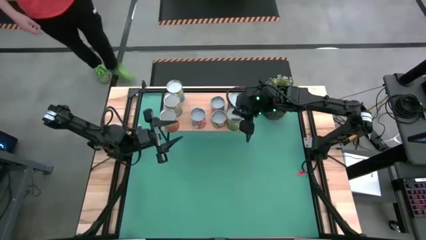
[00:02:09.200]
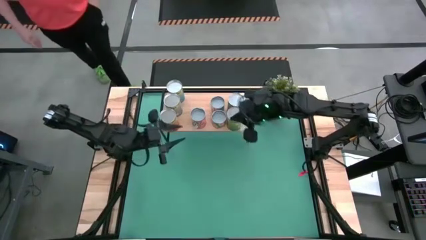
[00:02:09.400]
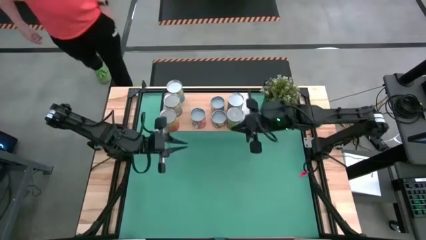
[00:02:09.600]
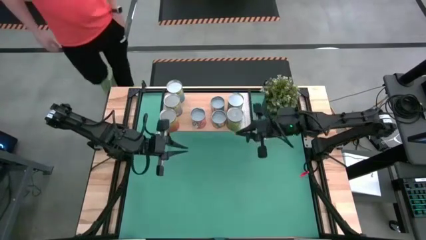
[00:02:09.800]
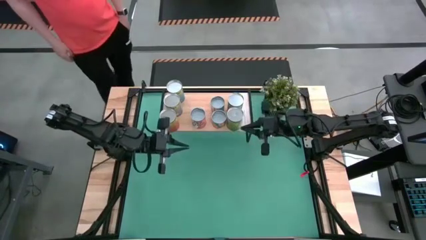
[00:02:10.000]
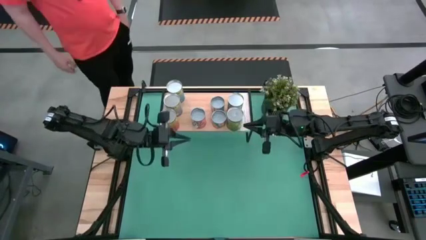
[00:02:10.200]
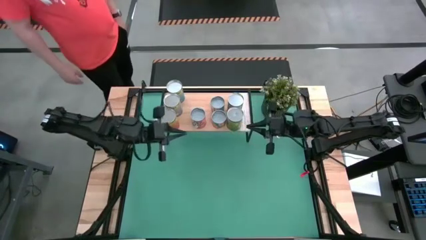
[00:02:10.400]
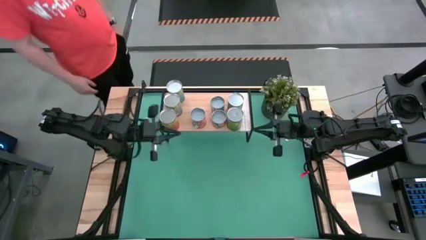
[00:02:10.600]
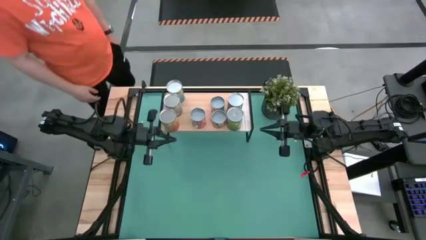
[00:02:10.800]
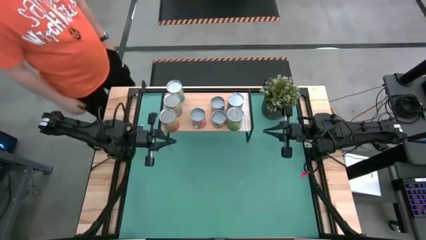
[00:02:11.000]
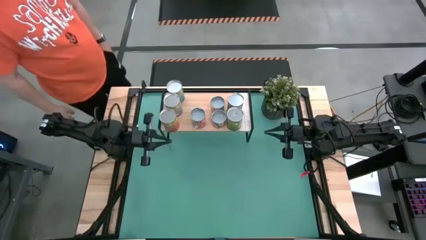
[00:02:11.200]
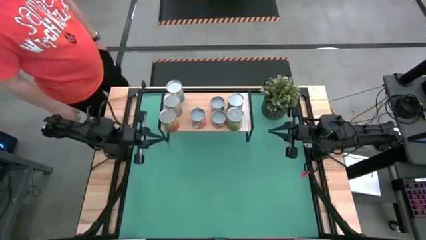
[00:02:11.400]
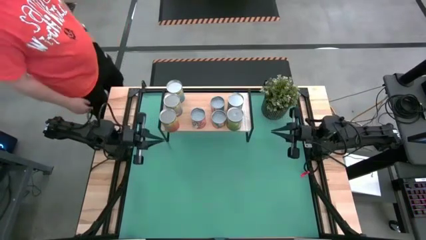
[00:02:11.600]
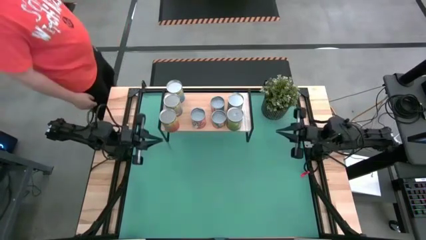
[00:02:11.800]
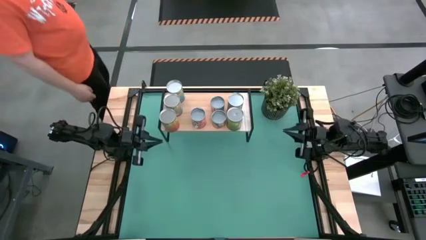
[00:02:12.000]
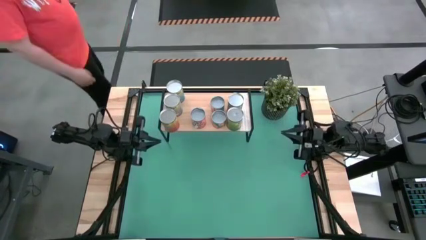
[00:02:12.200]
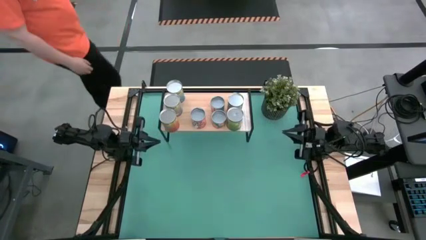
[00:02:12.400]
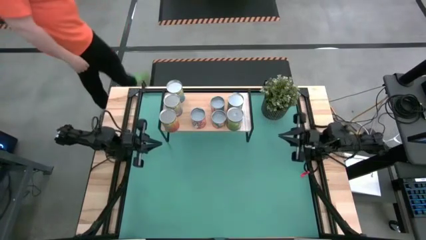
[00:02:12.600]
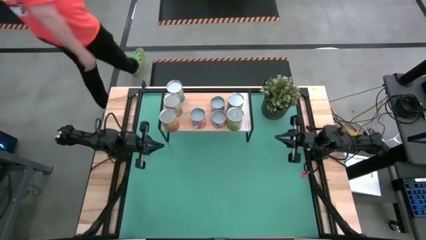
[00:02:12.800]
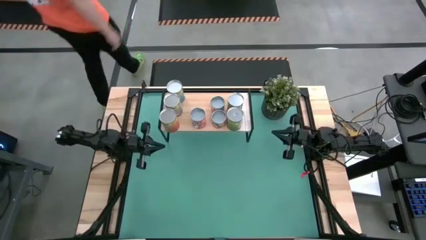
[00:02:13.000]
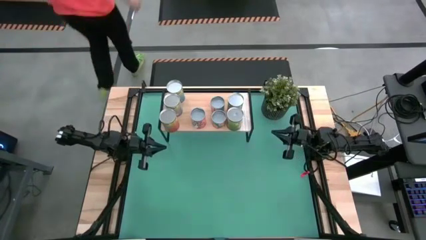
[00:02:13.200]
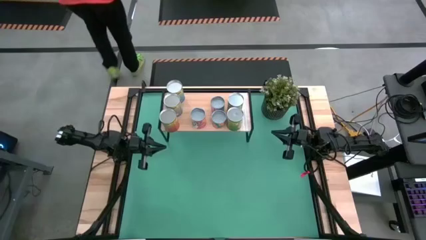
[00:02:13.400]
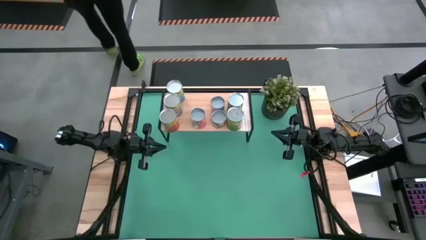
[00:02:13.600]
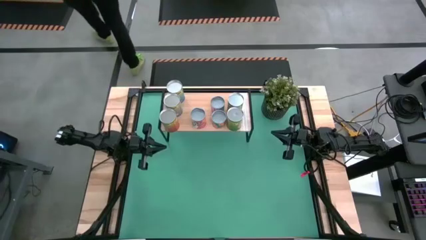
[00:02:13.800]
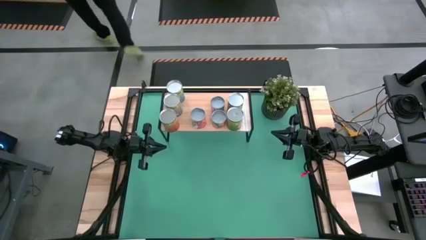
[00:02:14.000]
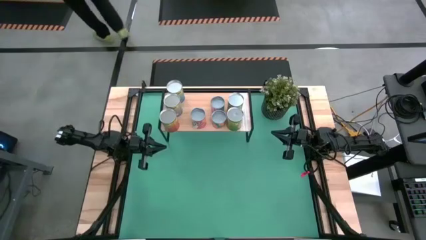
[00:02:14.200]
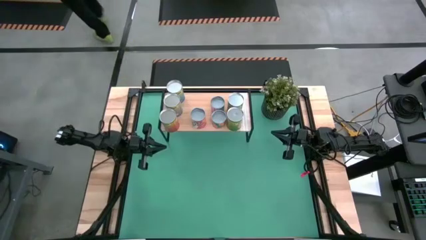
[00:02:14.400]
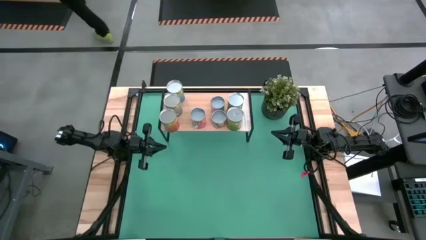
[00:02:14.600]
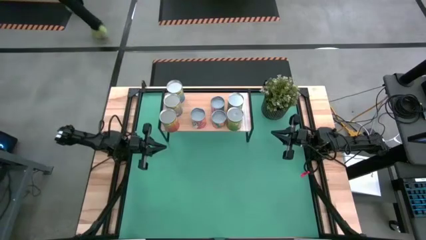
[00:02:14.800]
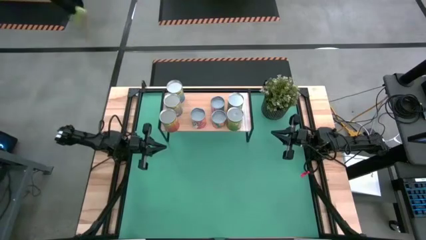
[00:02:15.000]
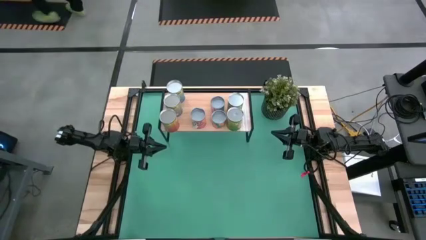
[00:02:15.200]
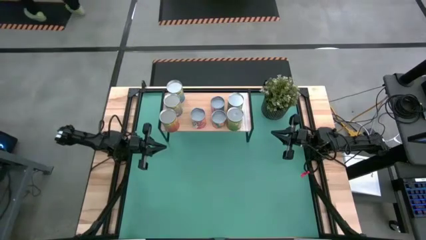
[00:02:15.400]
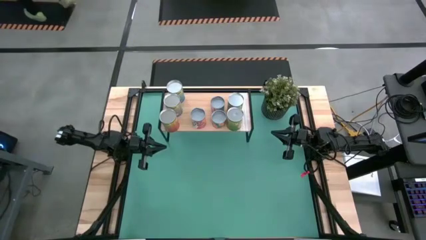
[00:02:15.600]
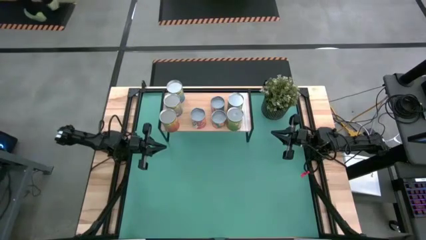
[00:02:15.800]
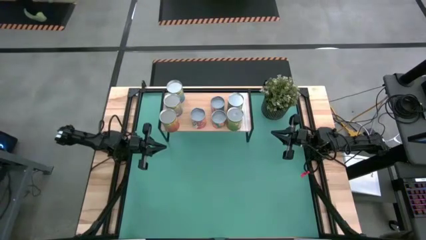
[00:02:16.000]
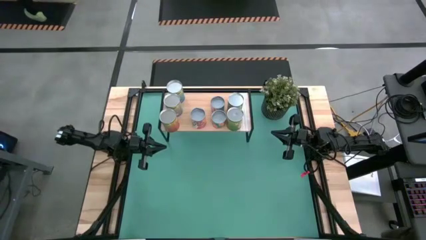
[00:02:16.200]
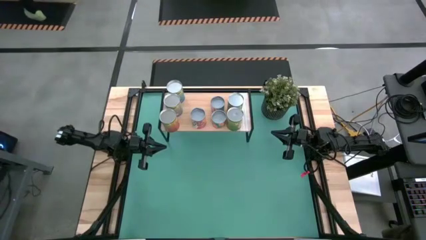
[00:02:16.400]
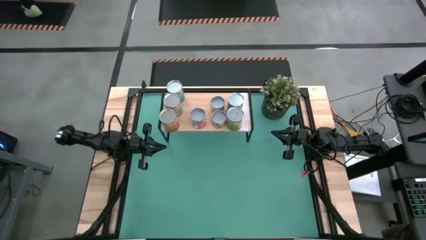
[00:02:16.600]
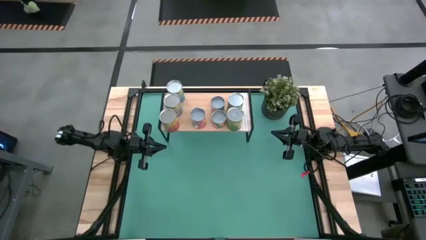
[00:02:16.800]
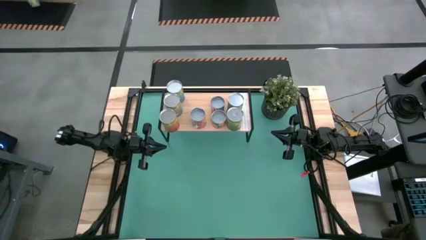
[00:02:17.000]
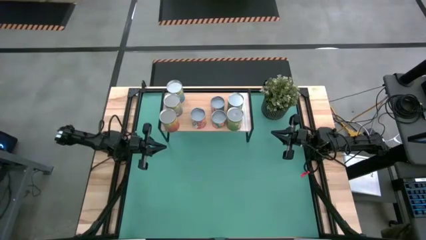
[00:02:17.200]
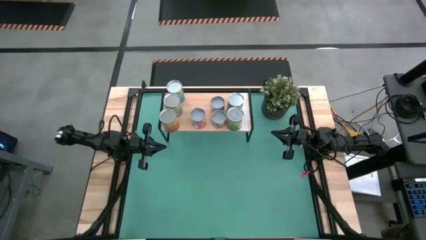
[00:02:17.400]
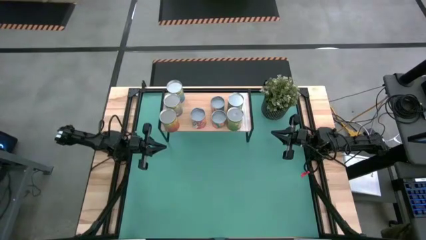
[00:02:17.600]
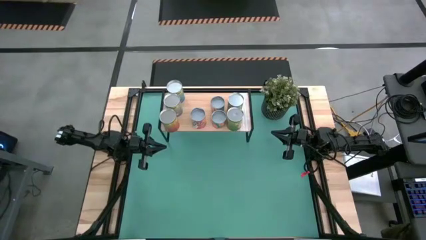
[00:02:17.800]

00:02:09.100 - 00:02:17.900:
Task: Pick and place cans onto a shelf
Return to Home Position

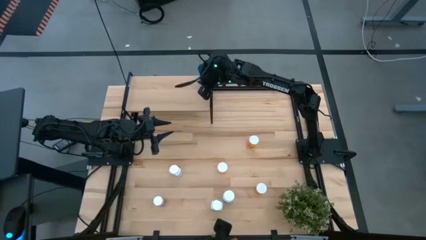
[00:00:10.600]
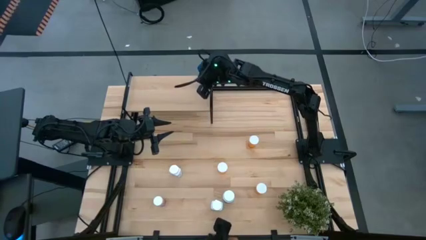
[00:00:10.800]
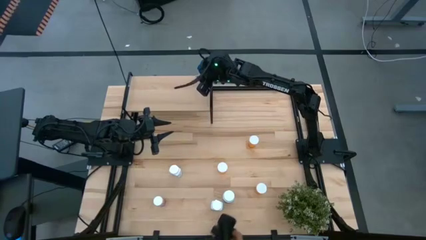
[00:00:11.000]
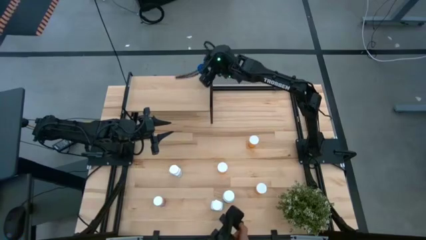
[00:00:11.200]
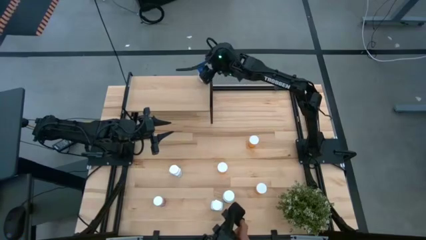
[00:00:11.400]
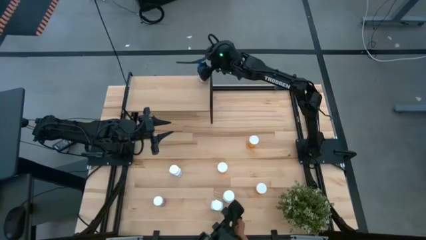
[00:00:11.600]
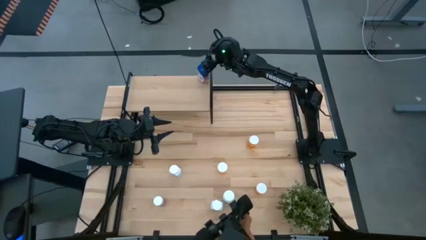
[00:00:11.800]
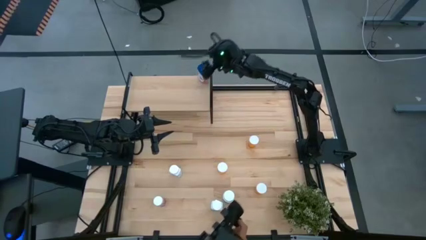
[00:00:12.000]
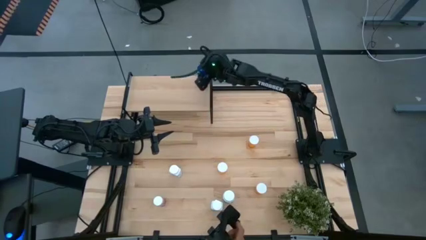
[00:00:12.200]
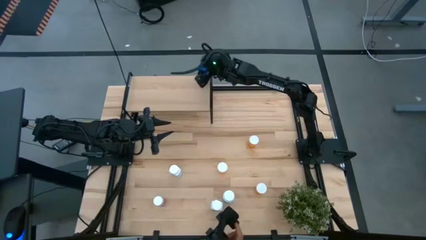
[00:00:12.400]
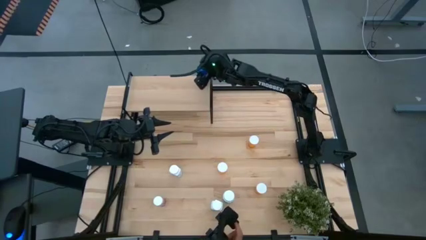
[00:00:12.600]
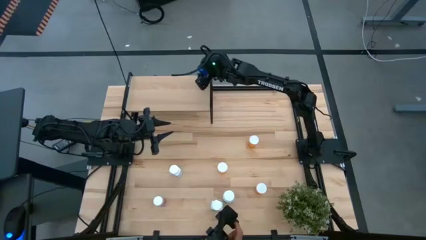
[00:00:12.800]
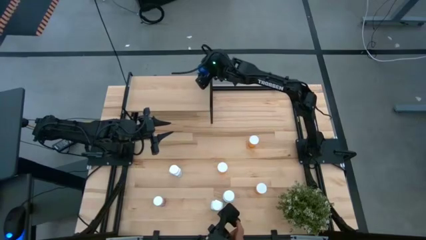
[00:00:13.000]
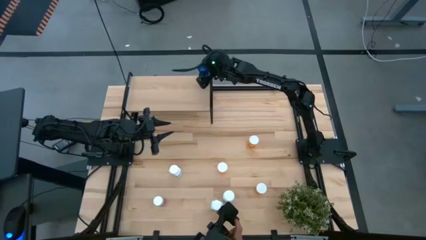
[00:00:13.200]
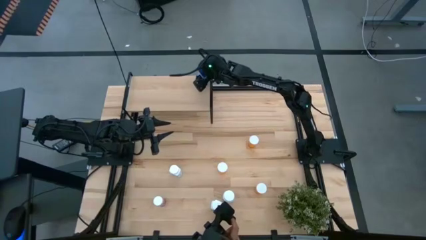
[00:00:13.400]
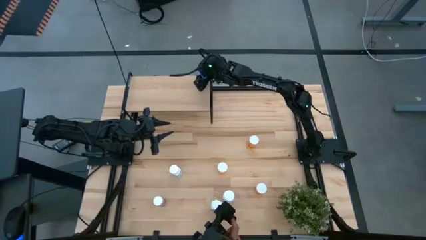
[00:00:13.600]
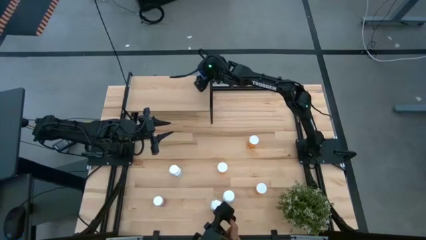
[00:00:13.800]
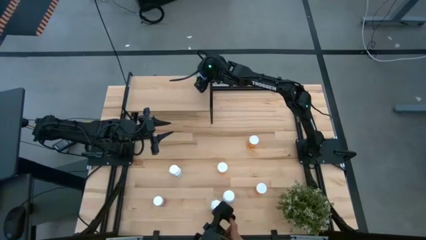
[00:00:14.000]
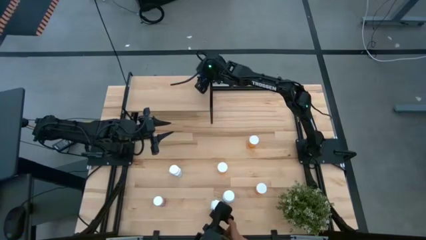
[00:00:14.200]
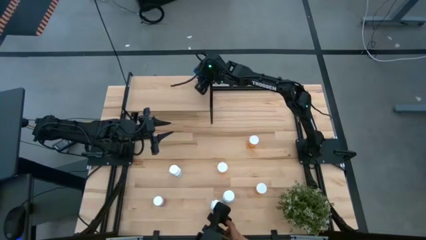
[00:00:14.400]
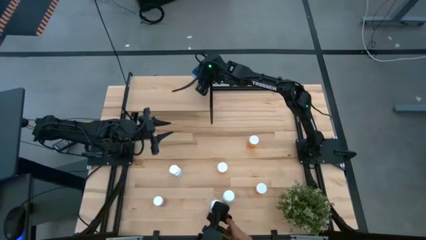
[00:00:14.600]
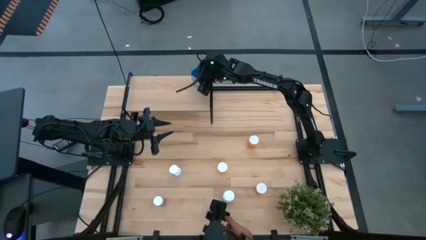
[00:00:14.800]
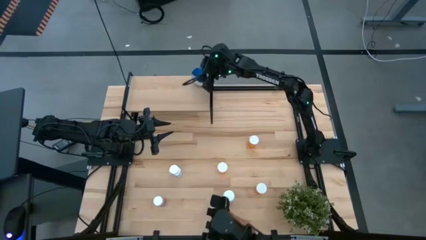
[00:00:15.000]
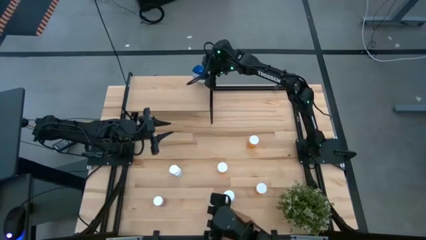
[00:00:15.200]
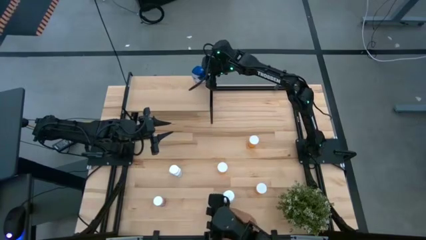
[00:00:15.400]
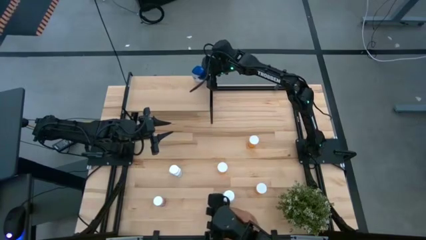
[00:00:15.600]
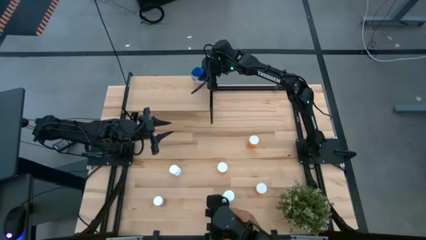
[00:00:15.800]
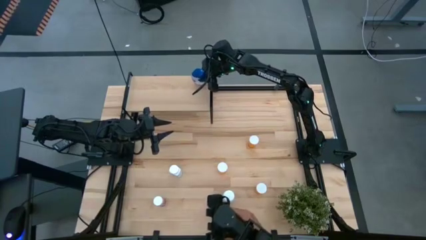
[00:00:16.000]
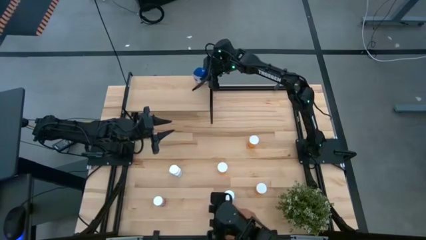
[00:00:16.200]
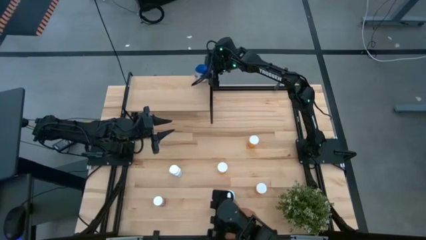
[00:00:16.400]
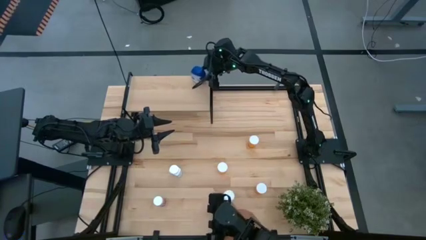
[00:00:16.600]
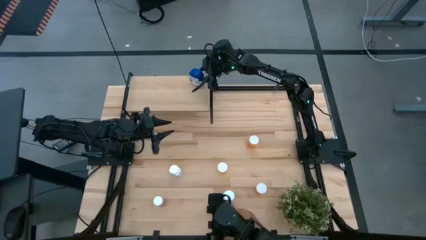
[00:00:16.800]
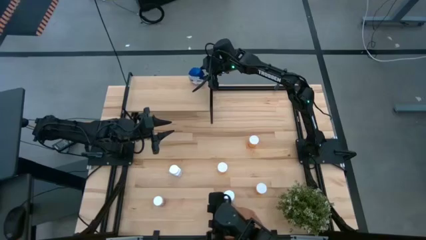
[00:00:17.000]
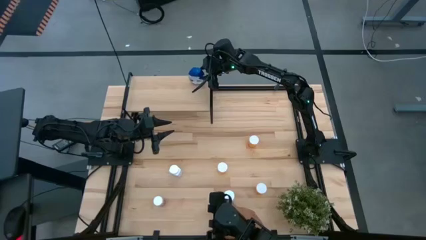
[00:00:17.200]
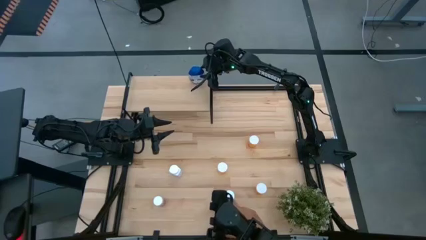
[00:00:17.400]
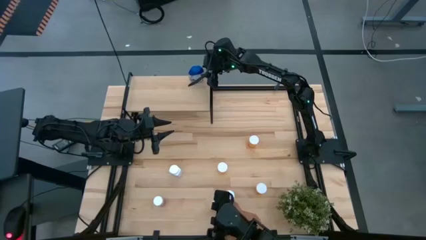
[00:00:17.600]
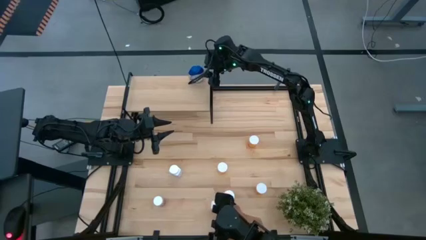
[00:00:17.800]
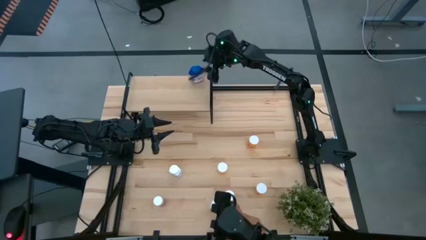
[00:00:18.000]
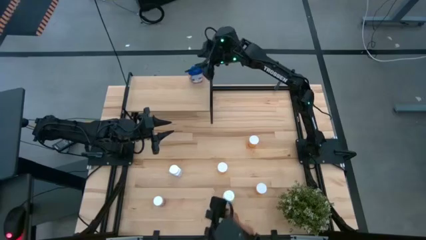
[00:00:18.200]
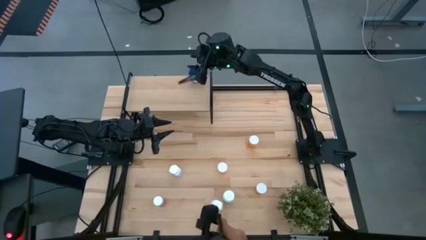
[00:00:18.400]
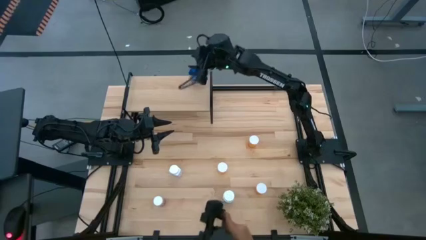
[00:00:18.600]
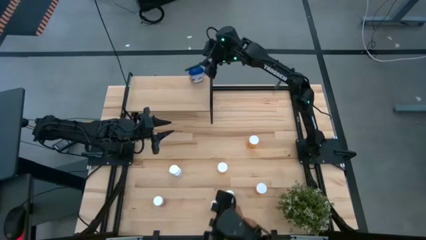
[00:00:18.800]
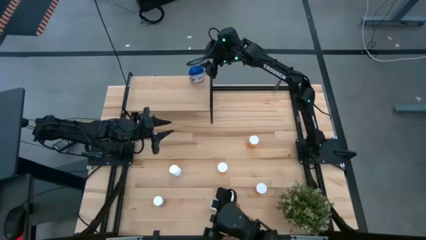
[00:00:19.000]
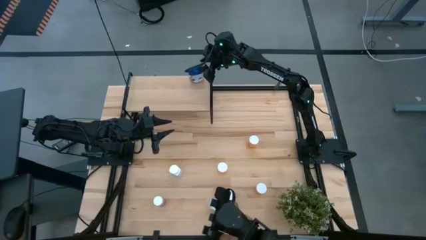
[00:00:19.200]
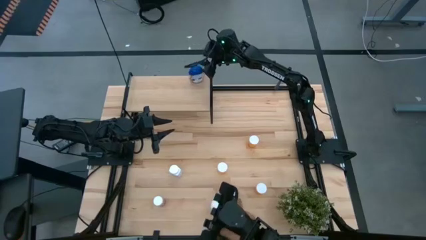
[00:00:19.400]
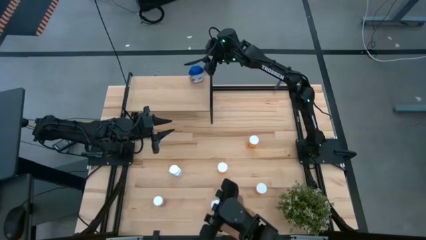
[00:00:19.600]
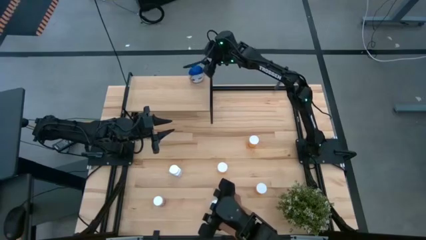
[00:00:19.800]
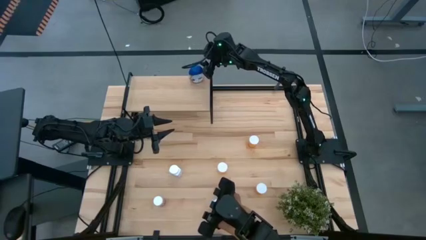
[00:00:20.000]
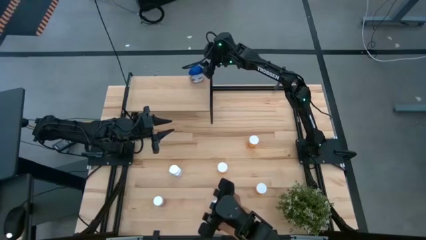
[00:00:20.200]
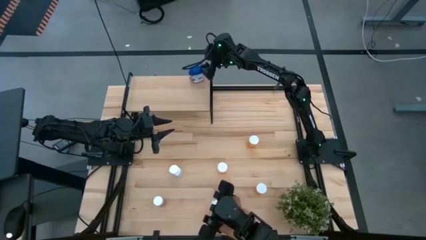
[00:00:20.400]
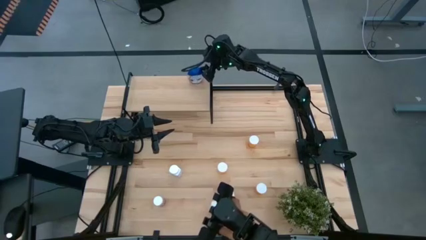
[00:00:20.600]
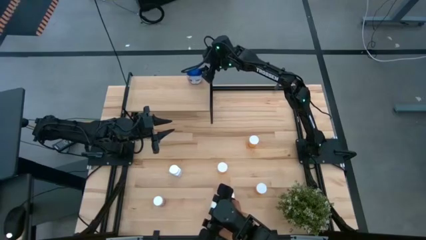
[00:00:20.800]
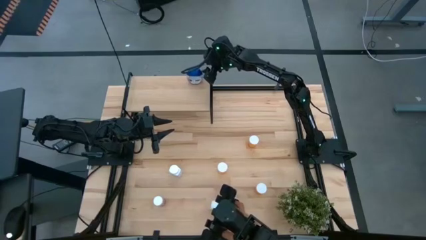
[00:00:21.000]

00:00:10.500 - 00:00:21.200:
Task: Pick and place medicine bottles onto shelf by color
Put the blue pill bottle on the shelf
